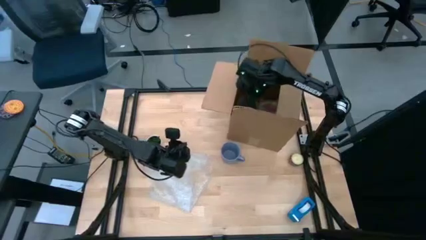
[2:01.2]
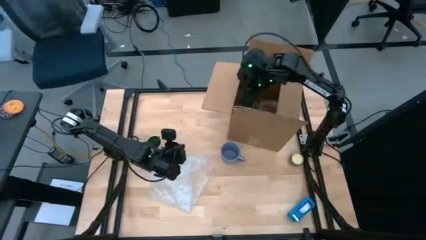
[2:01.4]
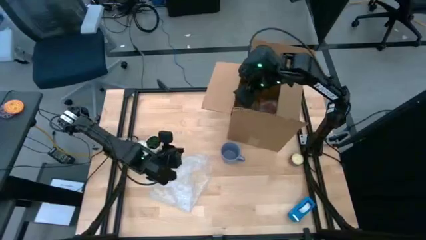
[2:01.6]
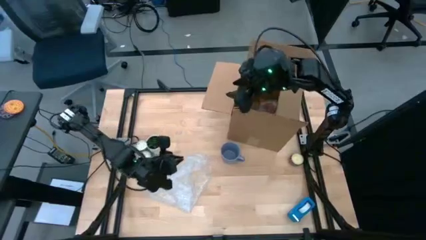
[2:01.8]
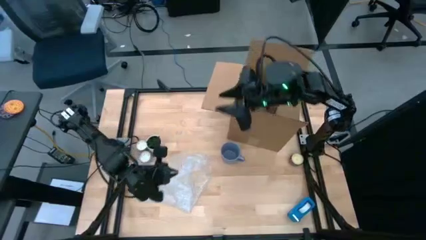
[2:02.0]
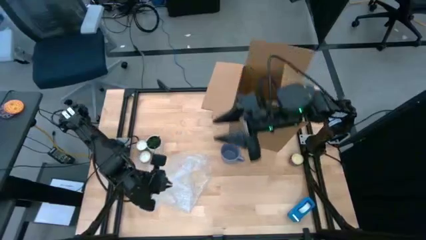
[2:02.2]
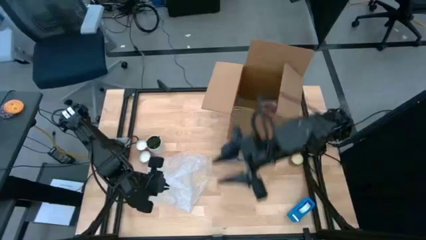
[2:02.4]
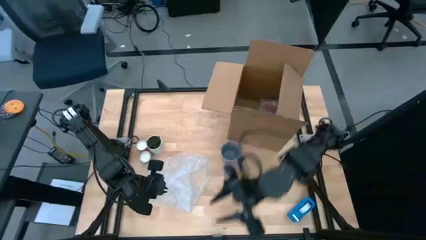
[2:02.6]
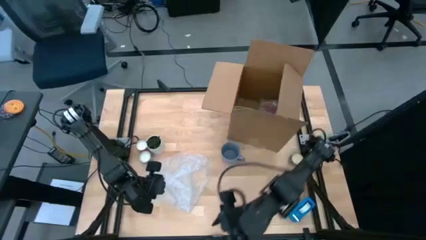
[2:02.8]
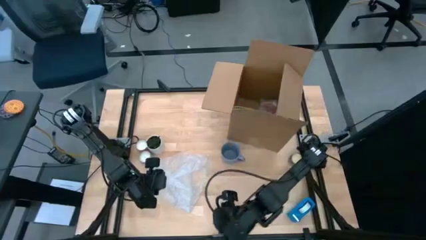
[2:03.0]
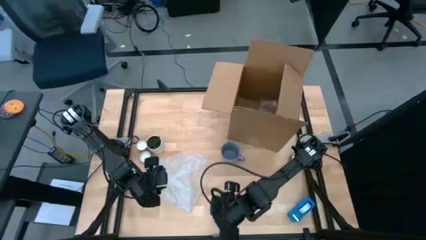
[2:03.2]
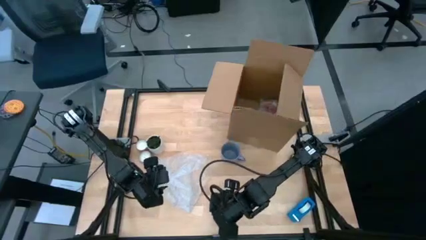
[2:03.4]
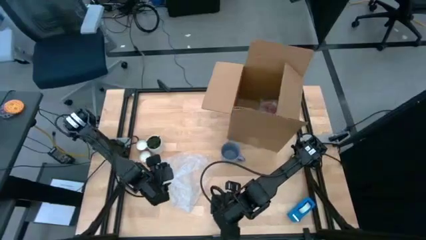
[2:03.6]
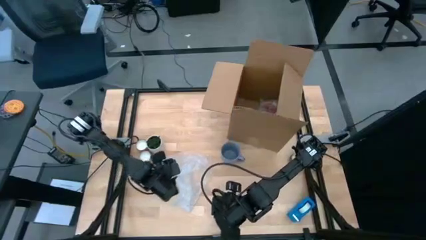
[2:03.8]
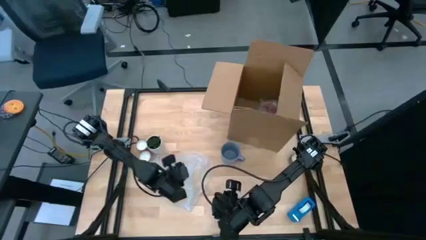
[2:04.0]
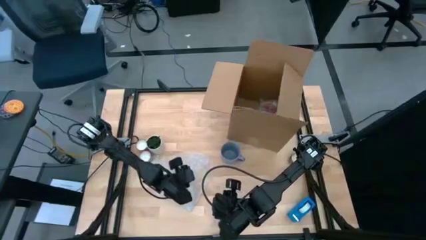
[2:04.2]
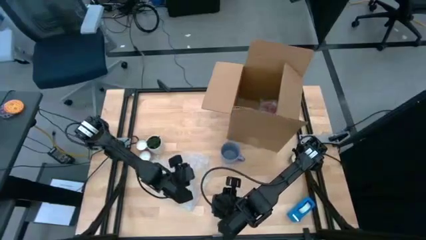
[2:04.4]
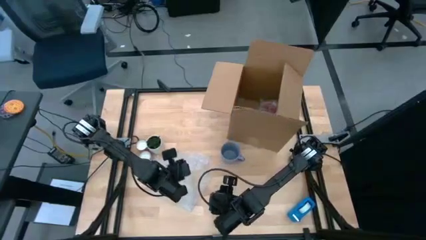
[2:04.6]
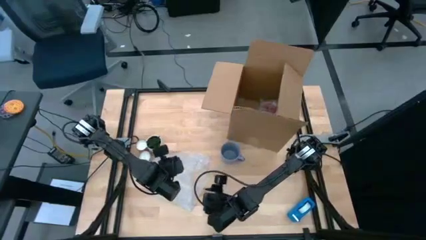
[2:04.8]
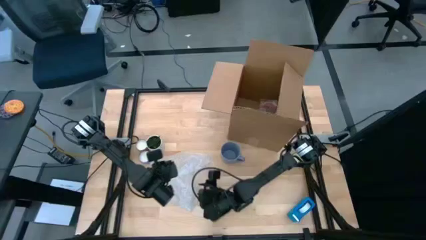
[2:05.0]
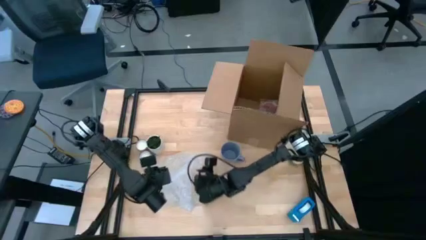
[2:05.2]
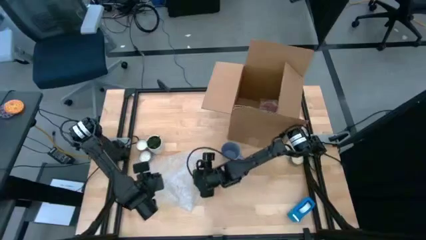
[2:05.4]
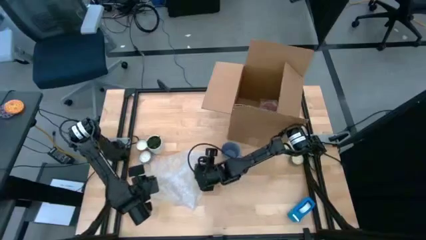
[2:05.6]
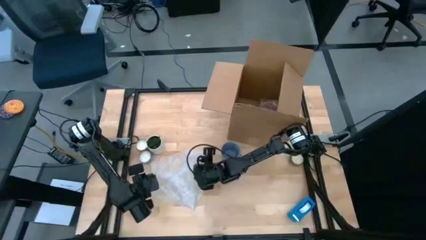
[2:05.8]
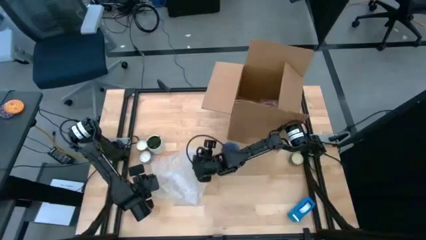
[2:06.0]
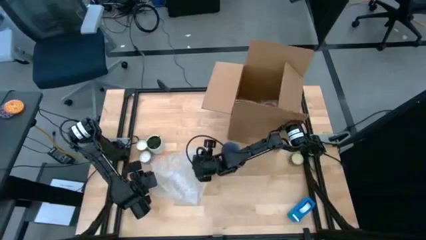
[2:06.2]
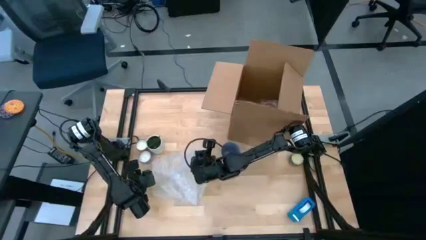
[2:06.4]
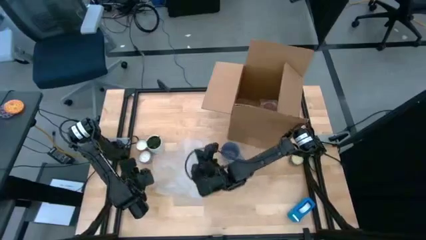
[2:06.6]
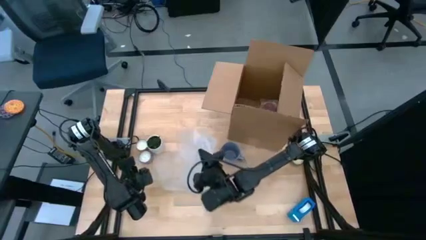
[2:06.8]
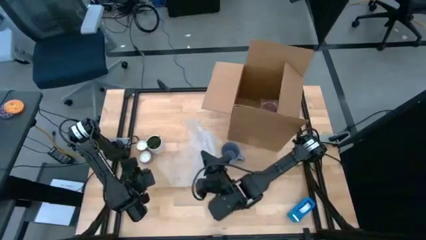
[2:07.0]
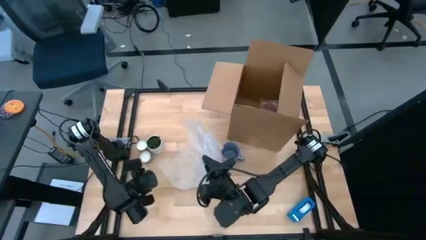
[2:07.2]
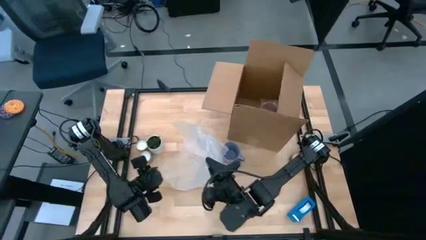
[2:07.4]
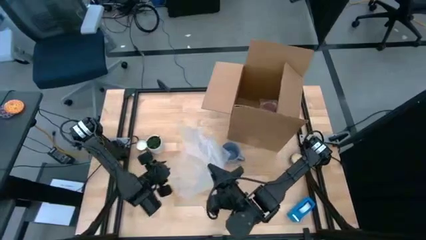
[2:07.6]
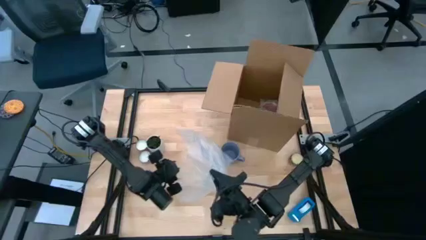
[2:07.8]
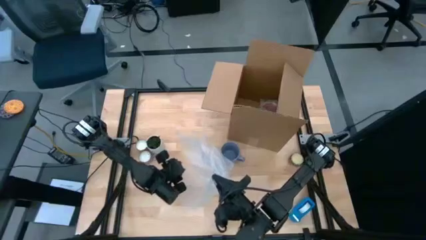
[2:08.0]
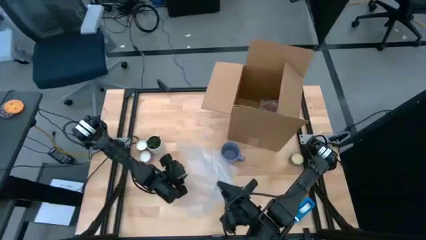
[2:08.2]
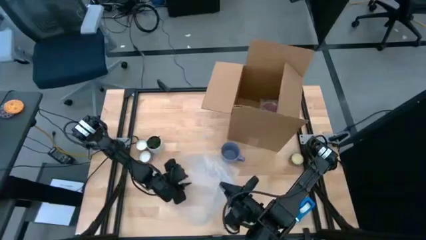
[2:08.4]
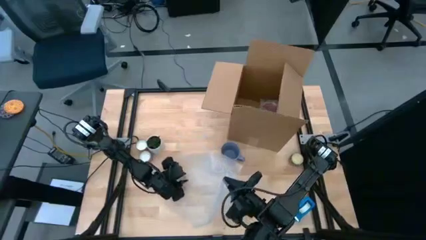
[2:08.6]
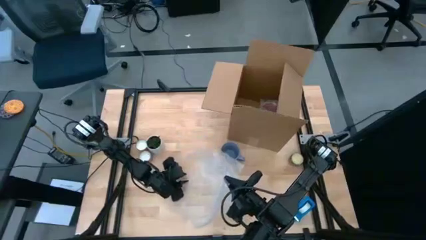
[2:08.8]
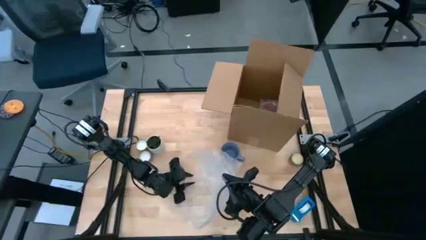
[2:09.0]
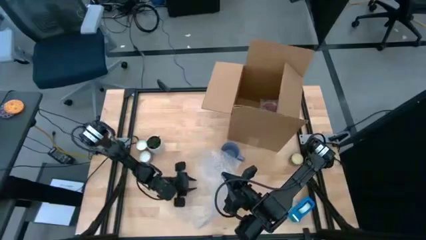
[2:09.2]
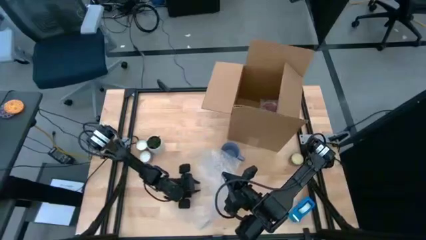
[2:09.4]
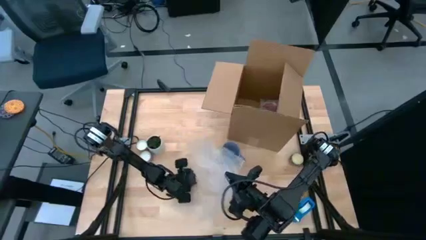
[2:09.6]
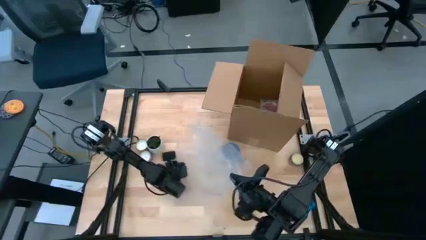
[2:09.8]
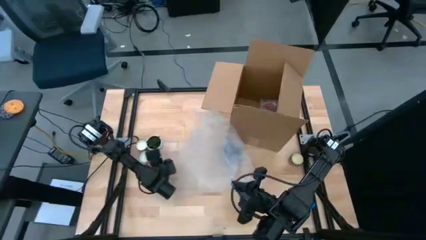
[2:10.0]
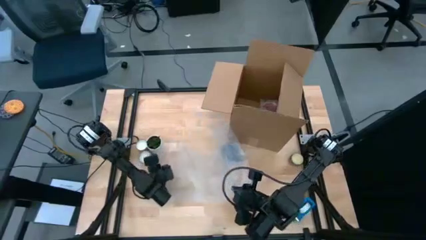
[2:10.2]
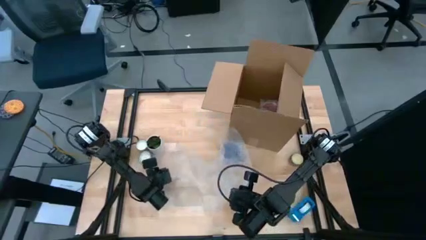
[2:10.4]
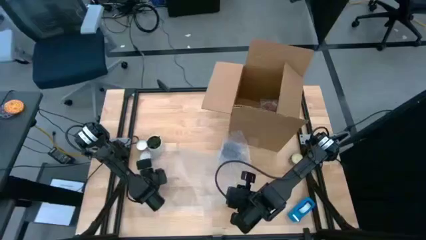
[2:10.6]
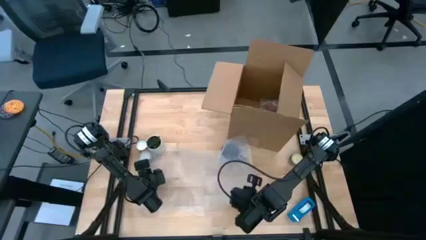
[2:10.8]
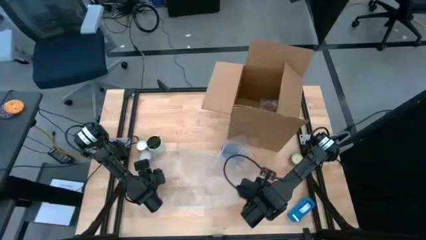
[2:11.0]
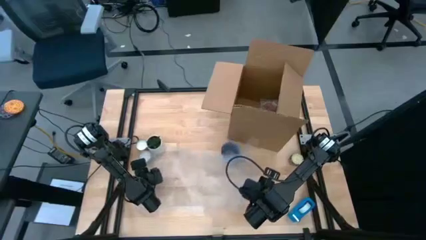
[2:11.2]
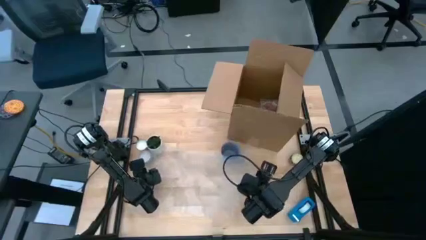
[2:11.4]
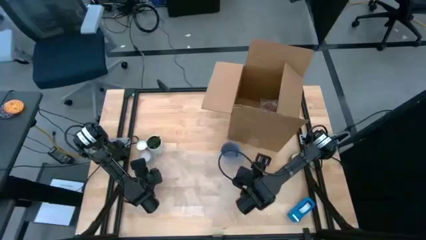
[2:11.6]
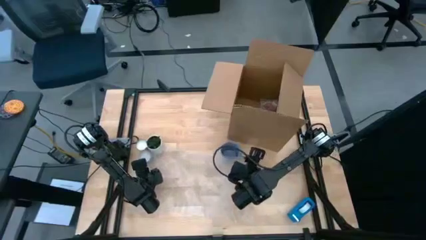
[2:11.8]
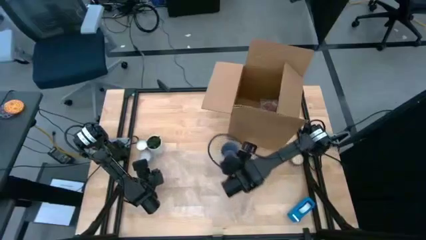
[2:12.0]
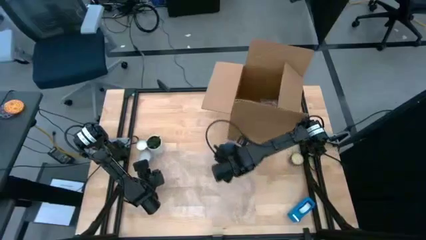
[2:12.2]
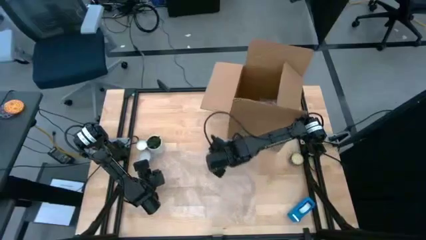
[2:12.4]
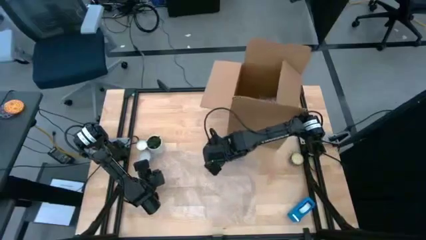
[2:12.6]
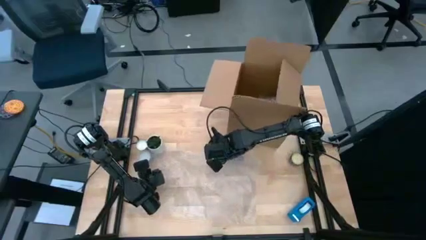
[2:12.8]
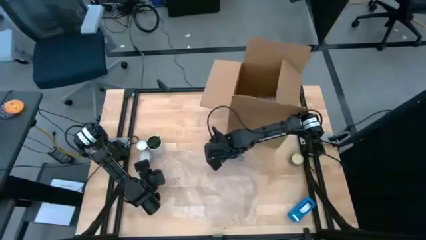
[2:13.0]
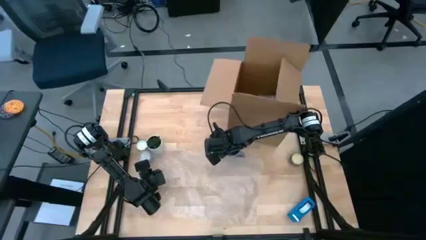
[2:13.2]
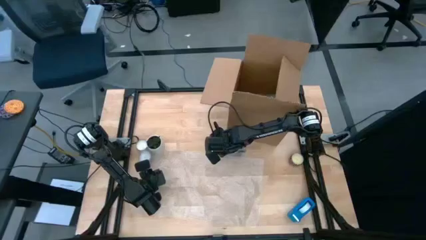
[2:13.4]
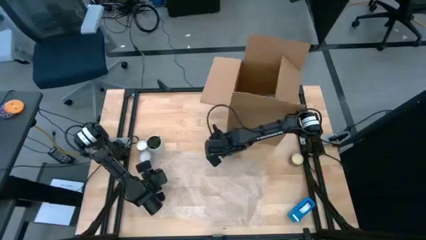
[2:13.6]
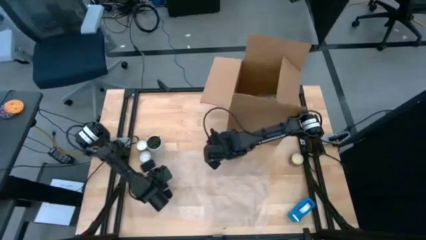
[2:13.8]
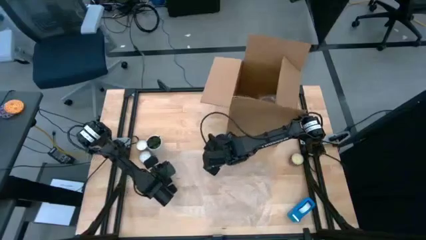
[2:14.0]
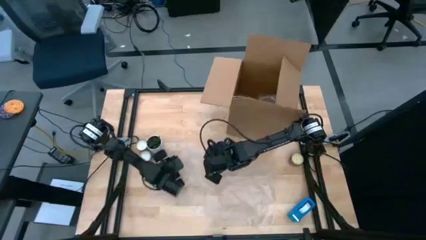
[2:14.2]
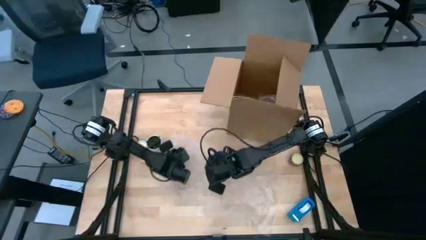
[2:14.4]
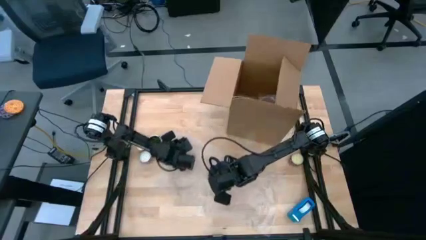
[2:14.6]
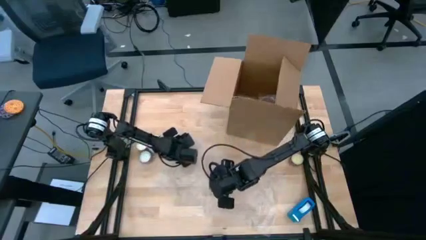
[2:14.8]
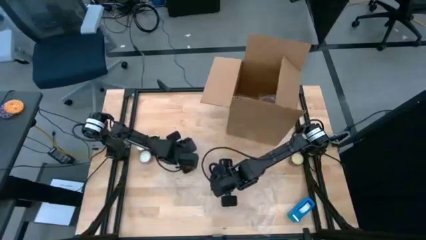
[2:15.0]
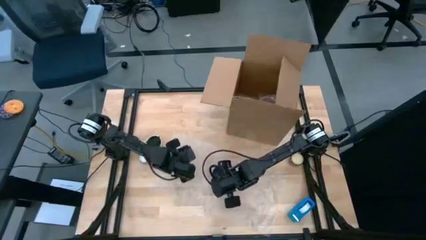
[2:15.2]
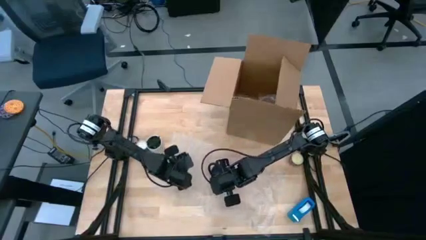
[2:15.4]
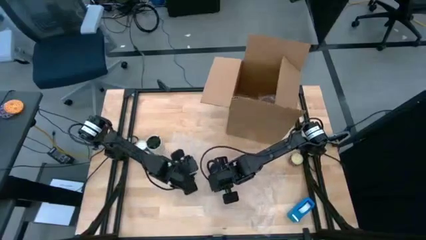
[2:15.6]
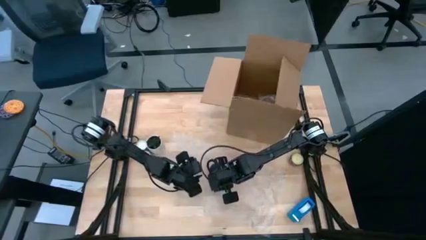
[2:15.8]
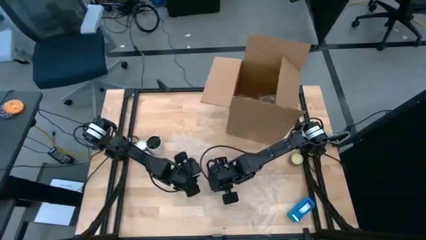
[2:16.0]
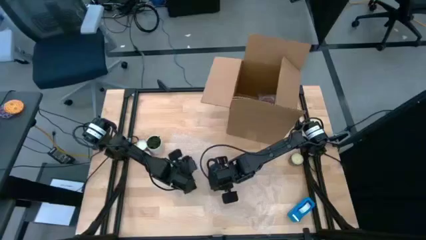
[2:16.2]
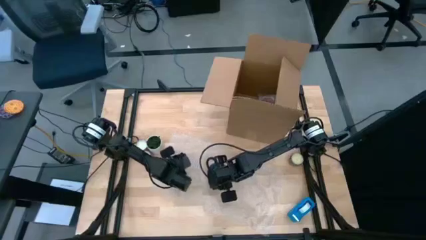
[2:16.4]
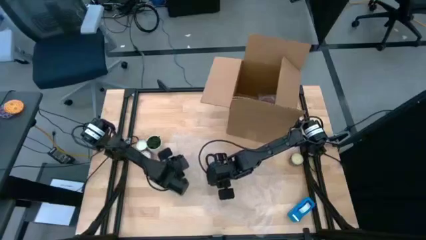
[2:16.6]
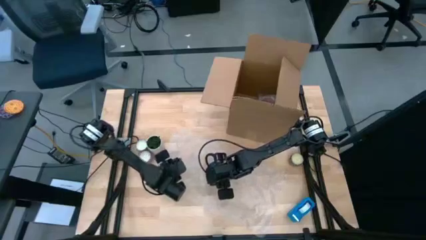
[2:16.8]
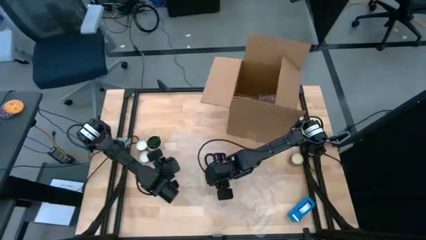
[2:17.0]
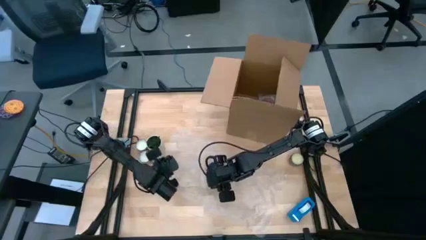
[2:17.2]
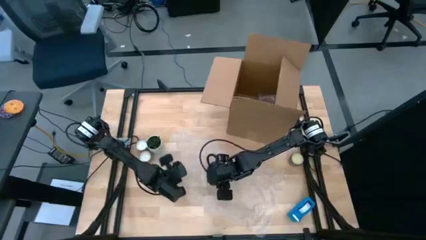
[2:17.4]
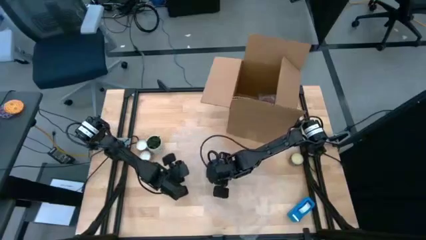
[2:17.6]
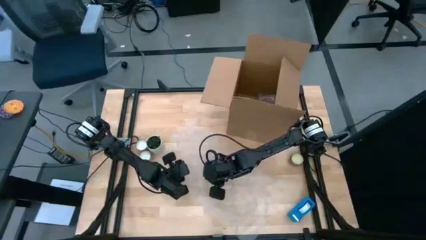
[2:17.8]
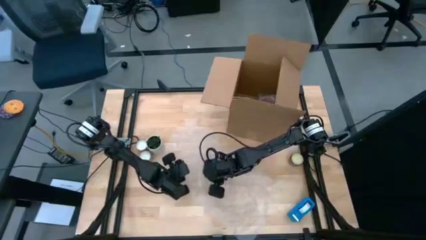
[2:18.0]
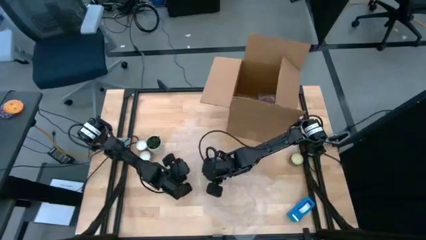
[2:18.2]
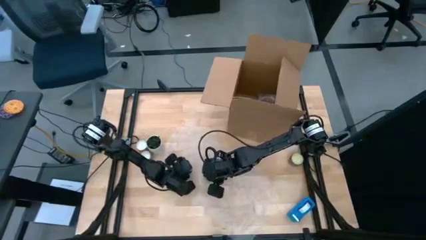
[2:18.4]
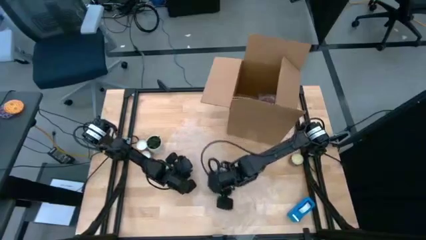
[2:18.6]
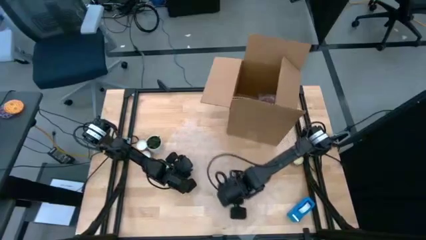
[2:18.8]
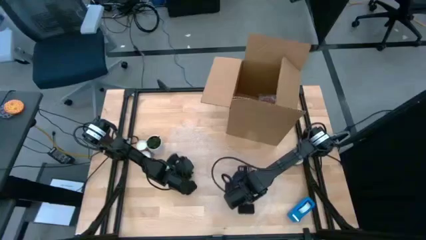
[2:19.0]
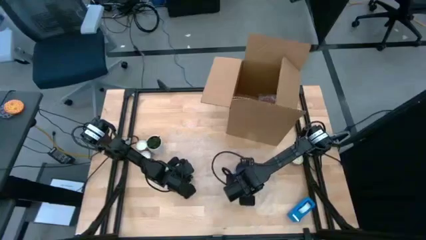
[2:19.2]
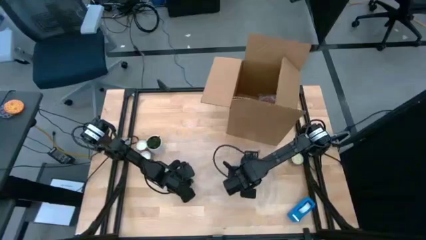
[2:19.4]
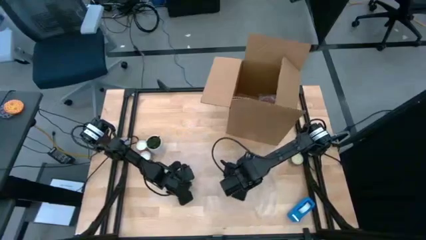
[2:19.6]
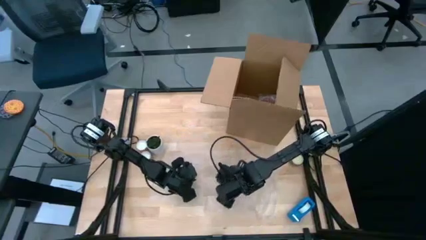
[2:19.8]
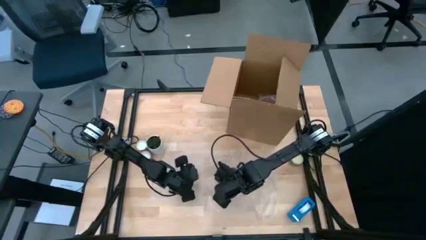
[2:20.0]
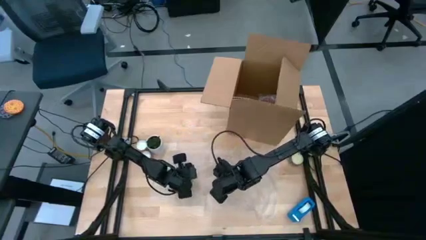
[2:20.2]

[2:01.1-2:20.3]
Task: wrap mug
Wrap the purple mug with the bubble wrap
